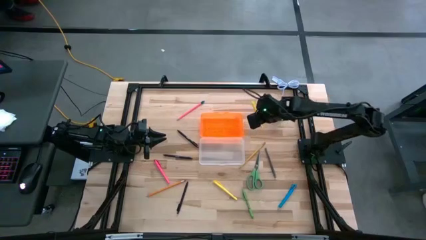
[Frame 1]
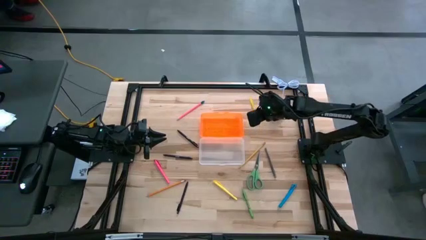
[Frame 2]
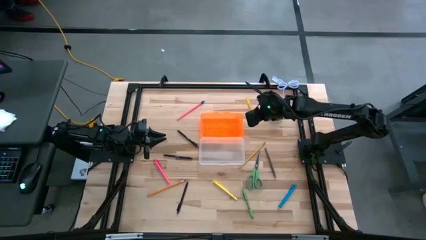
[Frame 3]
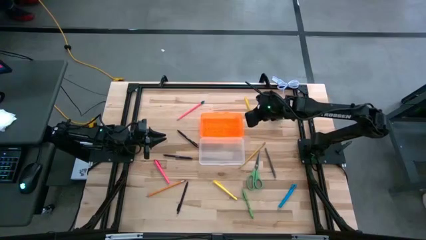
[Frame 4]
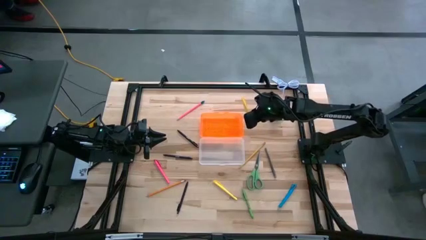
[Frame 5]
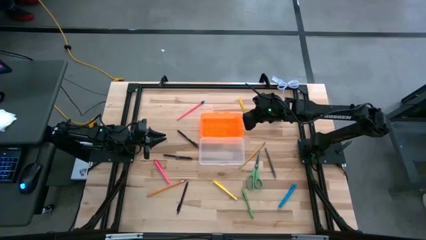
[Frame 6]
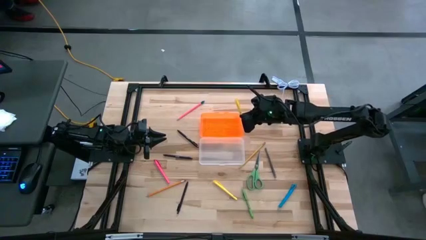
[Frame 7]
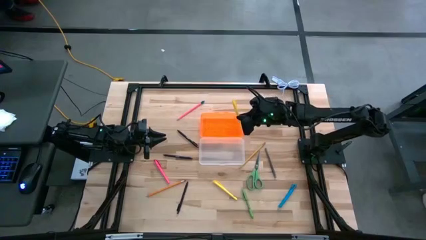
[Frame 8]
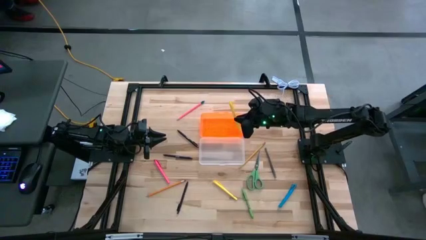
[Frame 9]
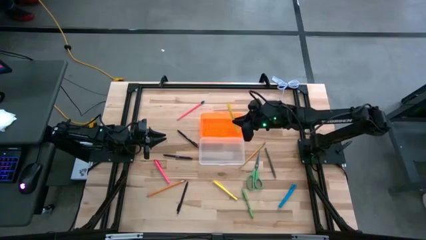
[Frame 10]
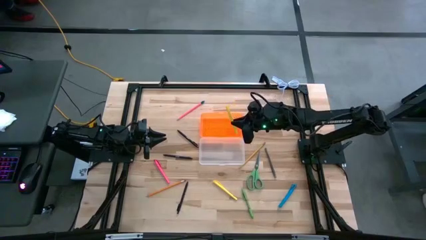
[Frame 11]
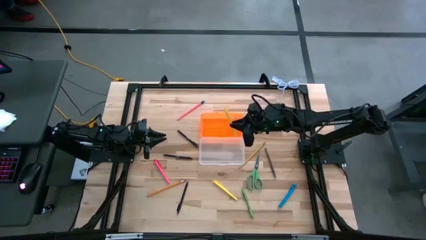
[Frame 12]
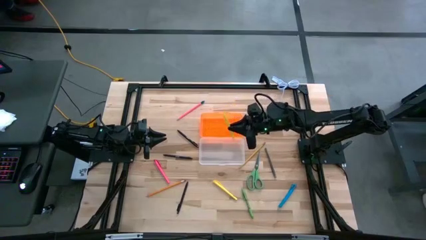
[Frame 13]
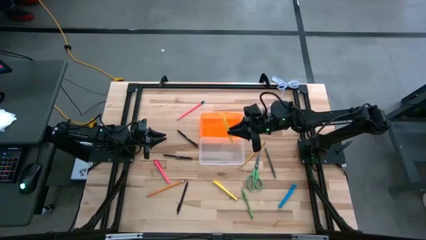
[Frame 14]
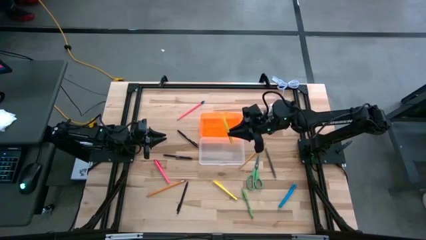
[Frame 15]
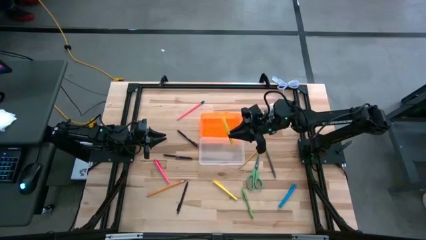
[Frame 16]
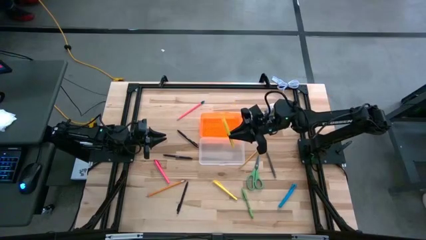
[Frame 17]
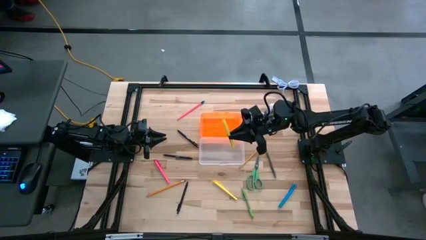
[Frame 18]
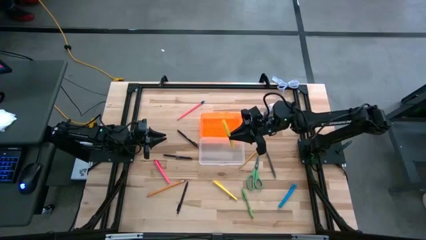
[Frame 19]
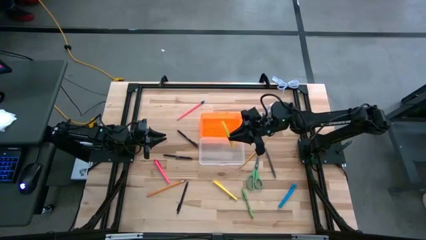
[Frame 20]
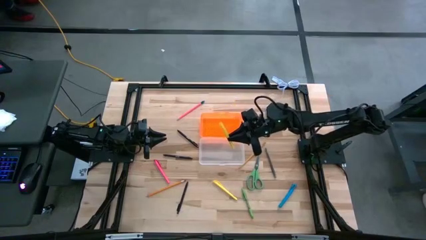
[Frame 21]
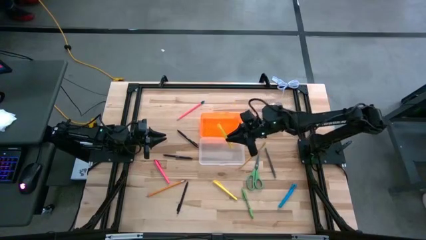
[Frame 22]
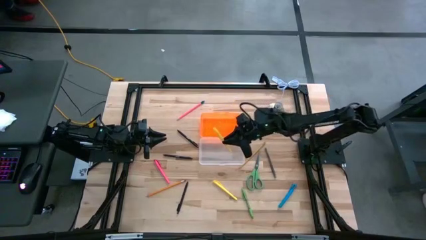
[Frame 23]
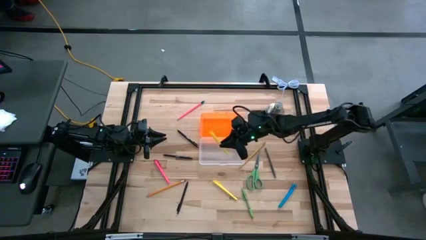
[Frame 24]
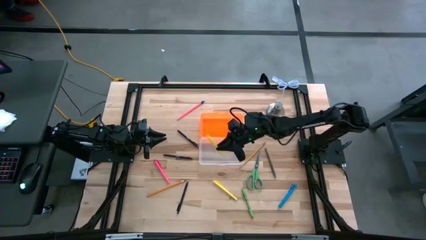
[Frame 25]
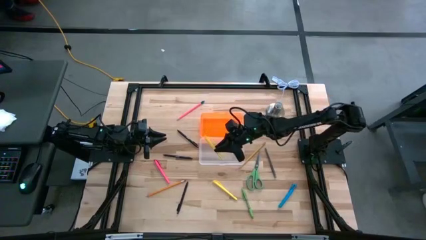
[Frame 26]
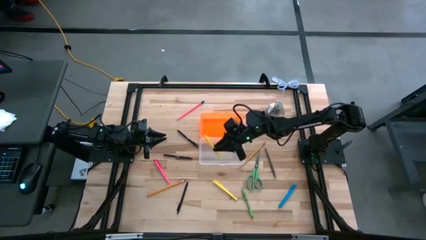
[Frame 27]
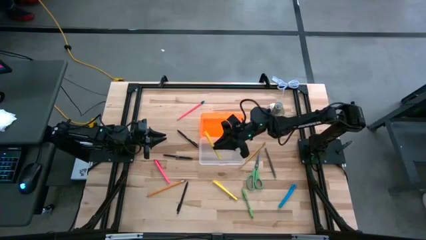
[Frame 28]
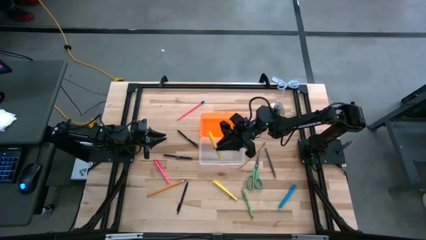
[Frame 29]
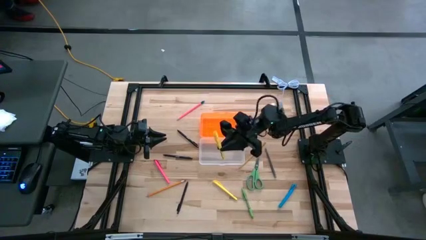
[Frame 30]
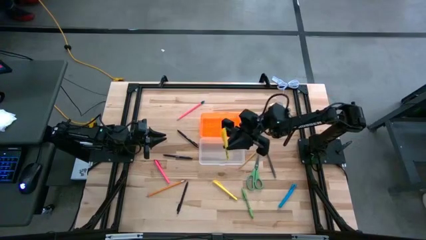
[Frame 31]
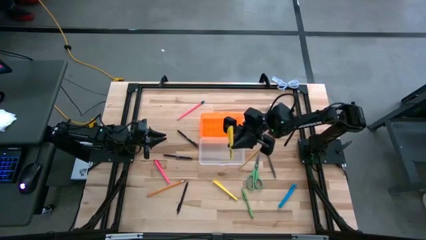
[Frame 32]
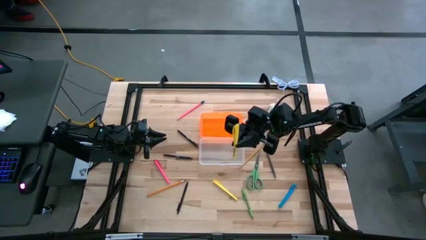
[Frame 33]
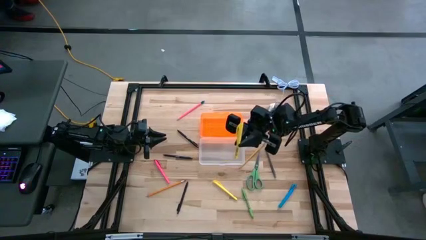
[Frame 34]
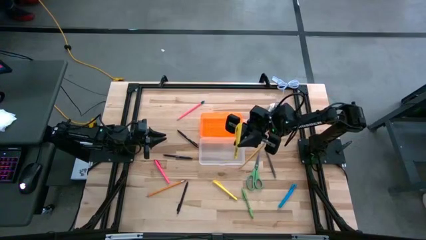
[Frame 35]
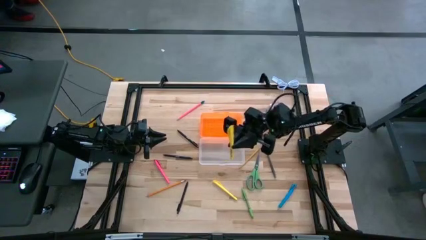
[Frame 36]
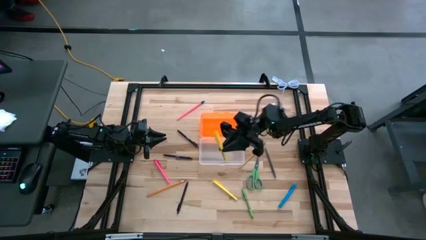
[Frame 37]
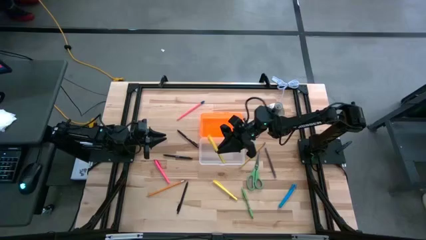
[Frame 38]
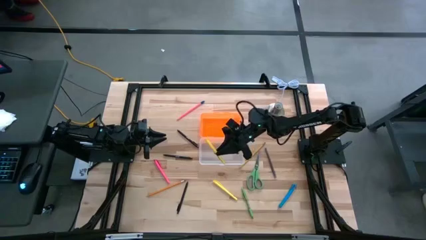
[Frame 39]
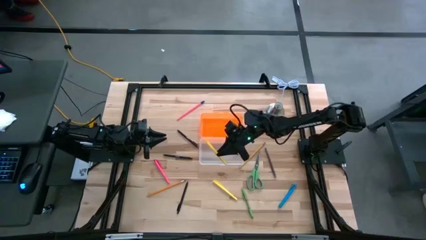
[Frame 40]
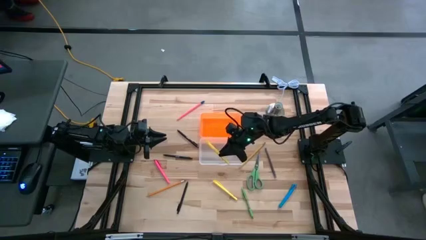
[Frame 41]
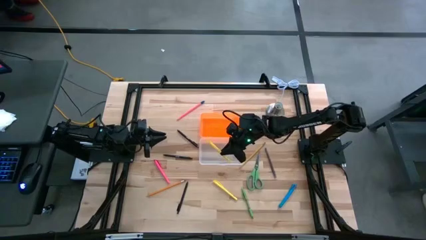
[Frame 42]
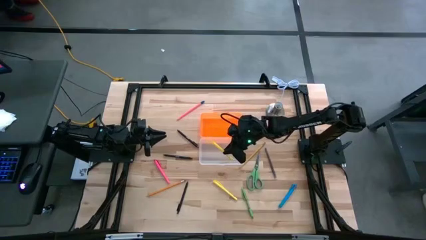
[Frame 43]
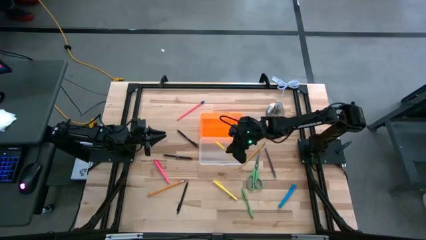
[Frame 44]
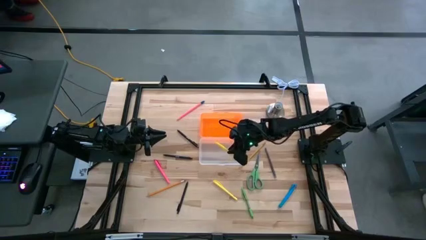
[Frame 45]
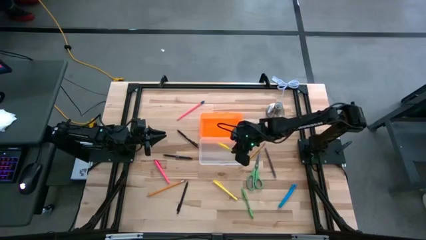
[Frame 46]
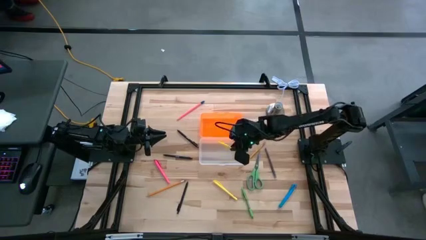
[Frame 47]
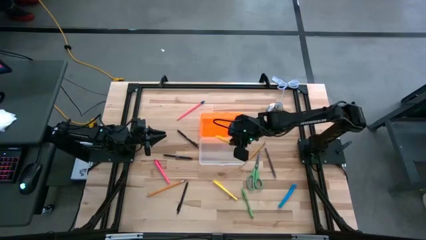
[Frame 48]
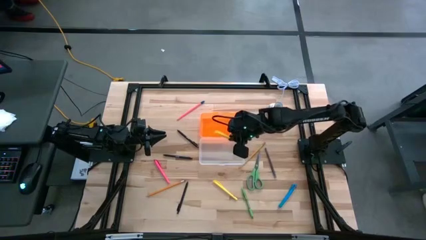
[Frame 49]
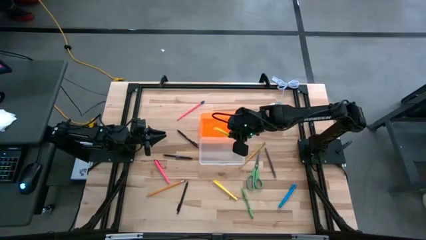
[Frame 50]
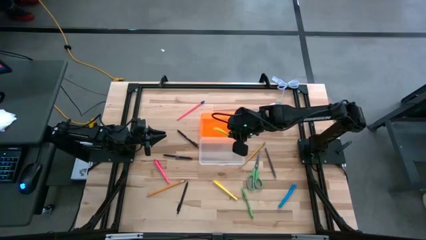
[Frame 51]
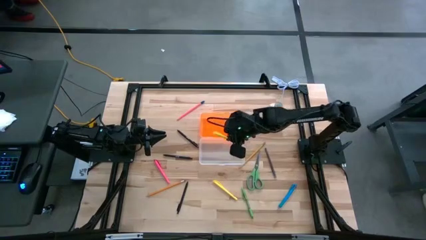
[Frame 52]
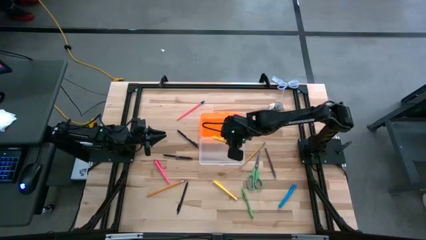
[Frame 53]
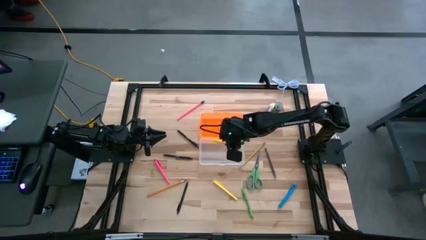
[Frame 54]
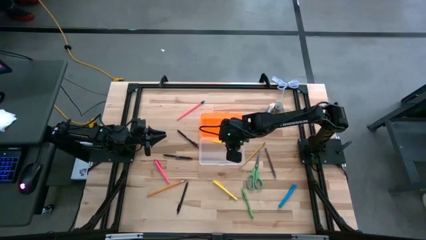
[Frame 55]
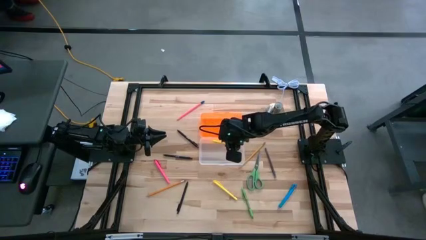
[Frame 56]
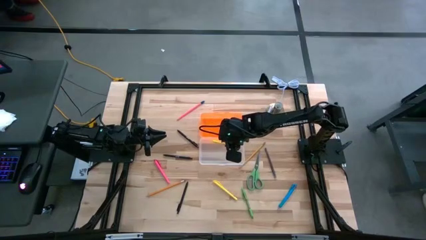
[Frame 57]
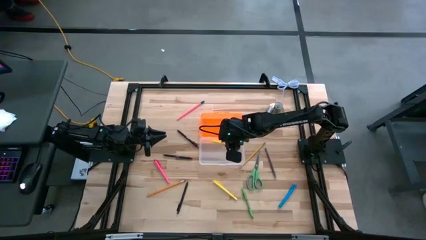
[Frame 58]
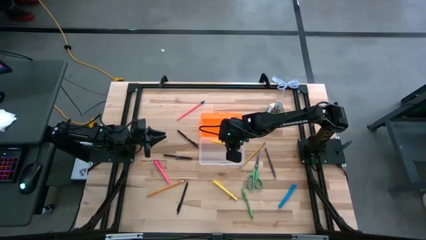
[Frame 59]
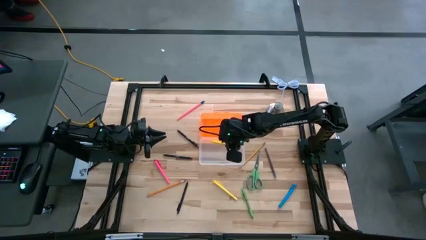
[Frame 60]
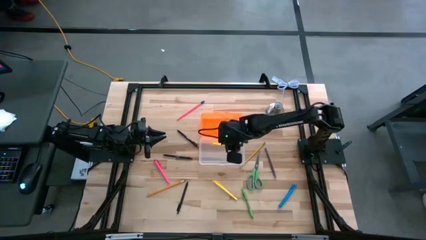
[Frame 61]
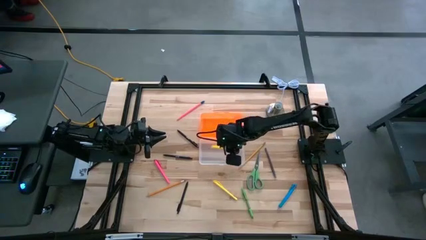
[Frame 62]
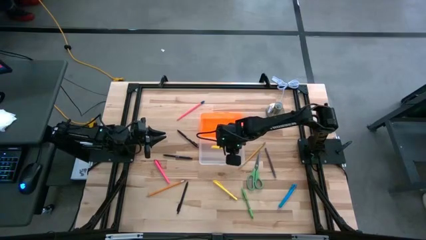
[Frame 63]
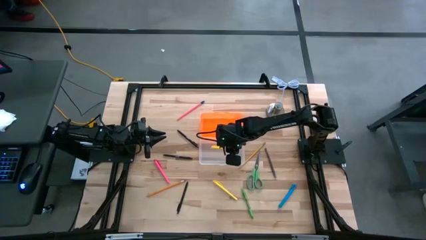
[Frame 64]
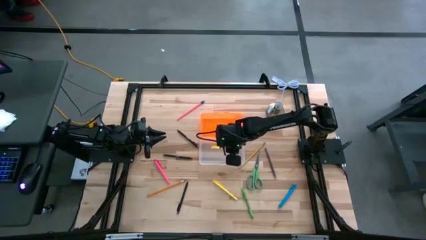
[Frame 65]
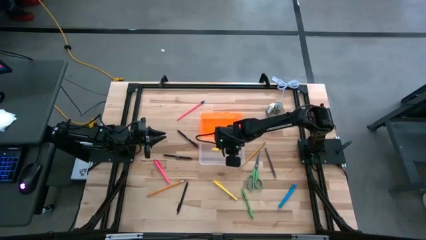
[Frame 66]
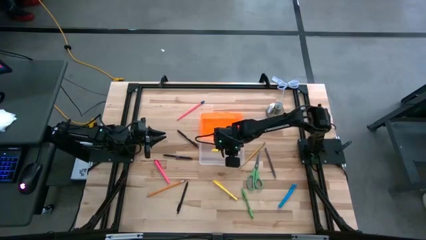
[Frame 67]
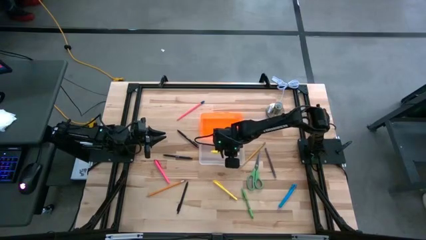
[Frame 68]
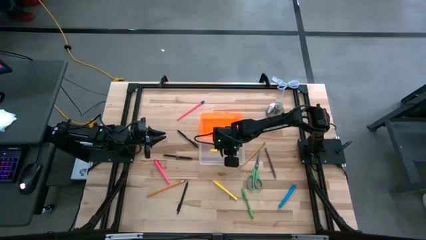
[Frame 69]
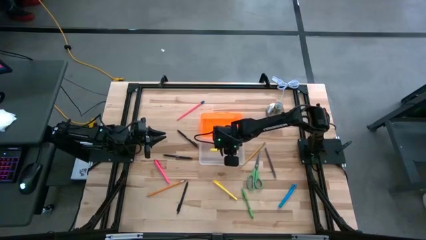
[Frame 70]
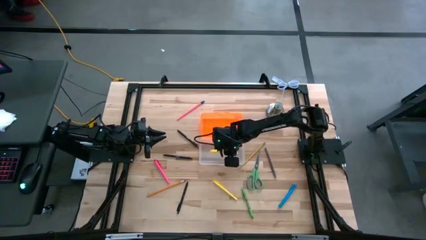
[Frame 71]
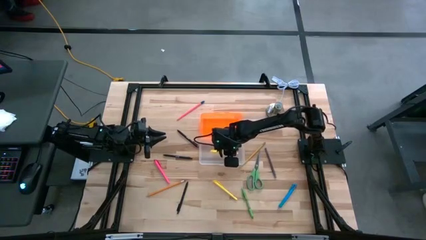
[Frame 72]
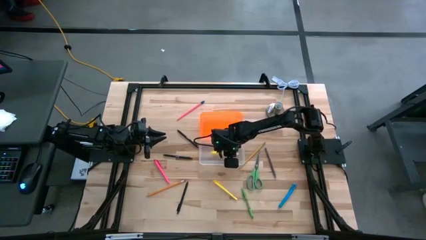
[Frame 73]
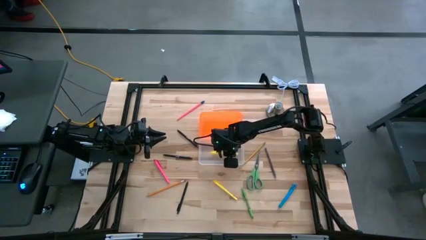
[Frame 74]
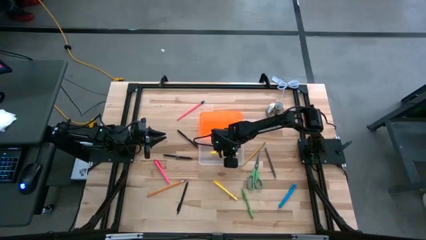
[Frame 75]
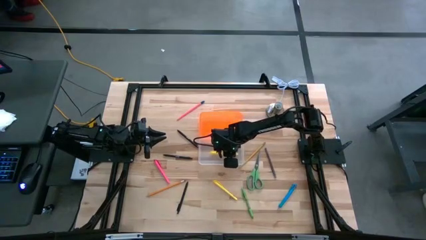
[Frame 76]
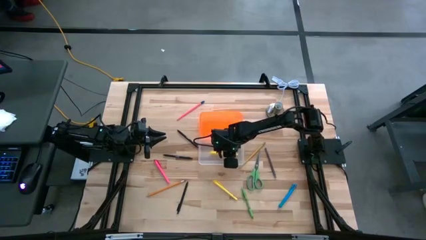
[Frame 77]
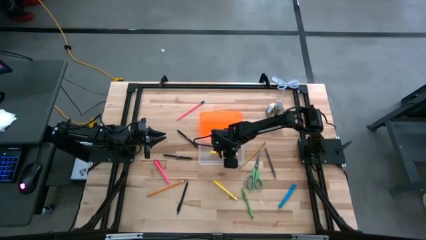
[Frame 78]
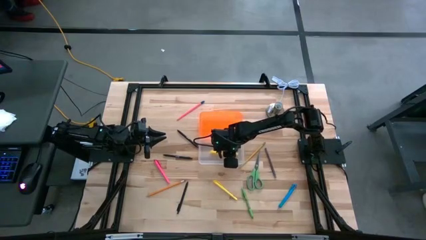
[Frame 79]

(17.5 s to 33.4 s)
Task: Pick & place school supplies into a supply box
Put the yellow pen into the container
